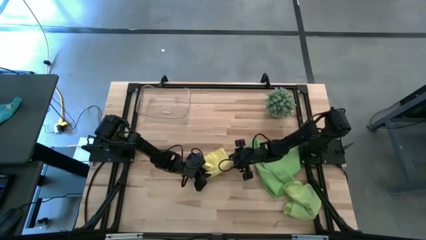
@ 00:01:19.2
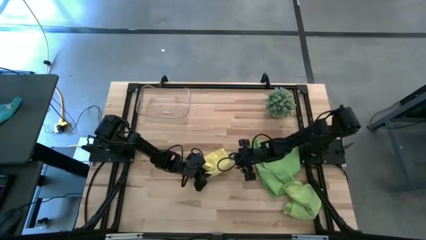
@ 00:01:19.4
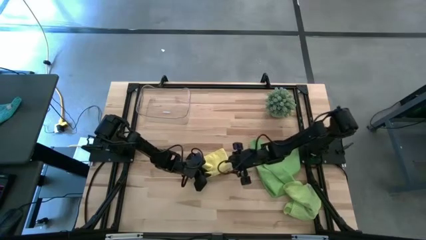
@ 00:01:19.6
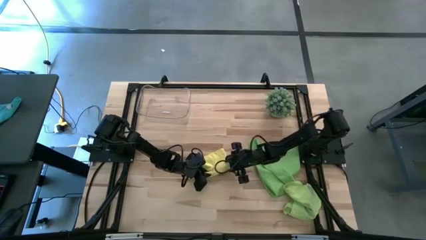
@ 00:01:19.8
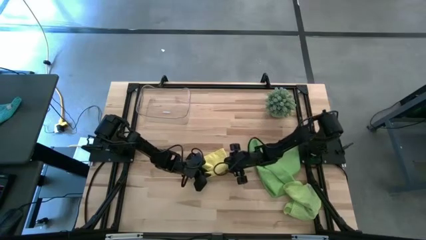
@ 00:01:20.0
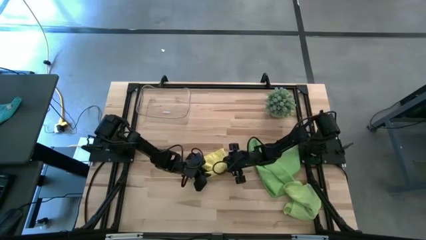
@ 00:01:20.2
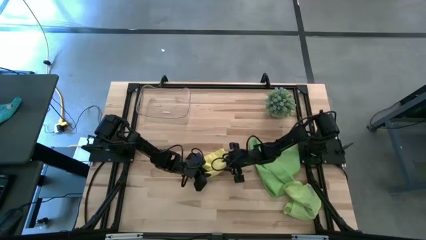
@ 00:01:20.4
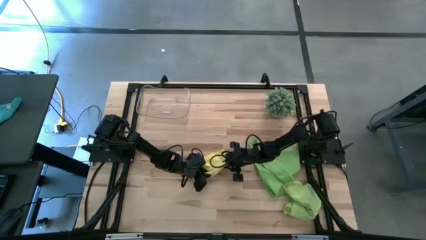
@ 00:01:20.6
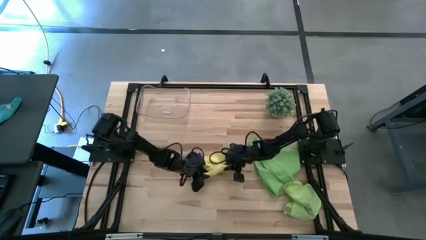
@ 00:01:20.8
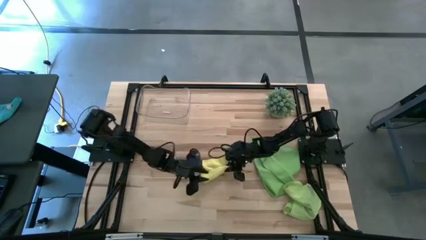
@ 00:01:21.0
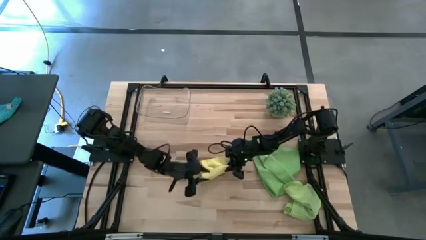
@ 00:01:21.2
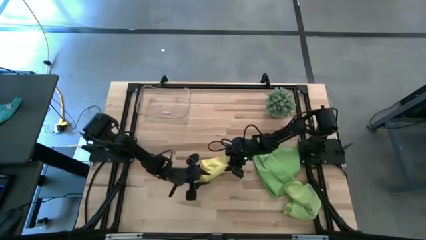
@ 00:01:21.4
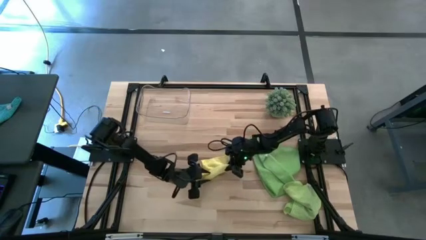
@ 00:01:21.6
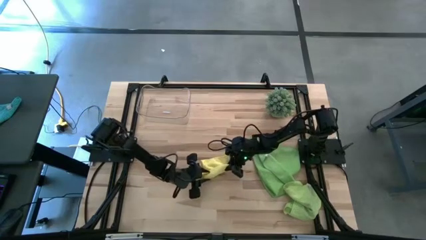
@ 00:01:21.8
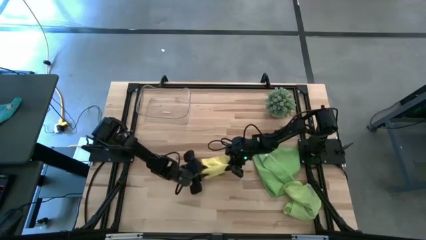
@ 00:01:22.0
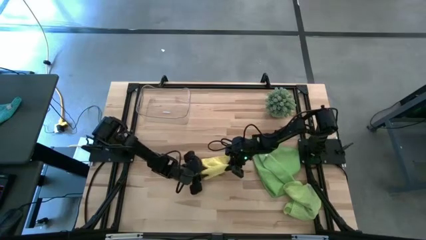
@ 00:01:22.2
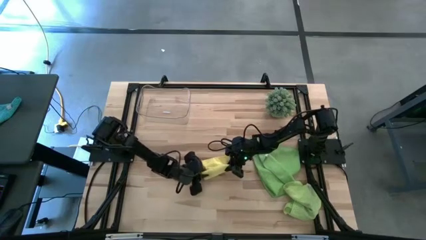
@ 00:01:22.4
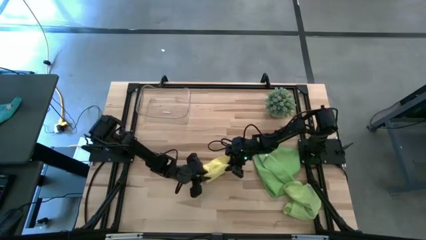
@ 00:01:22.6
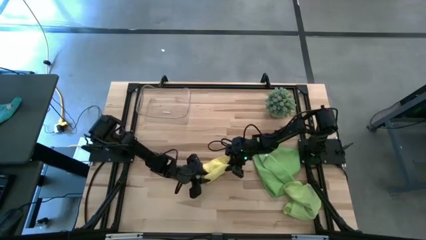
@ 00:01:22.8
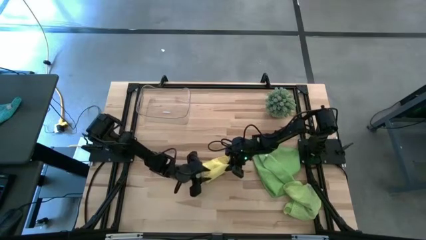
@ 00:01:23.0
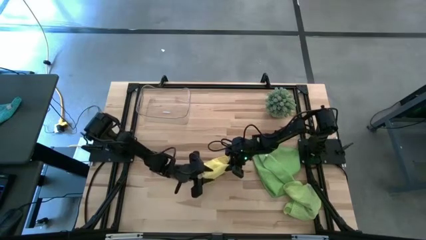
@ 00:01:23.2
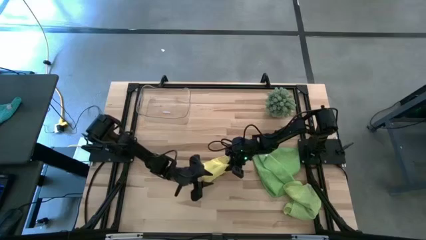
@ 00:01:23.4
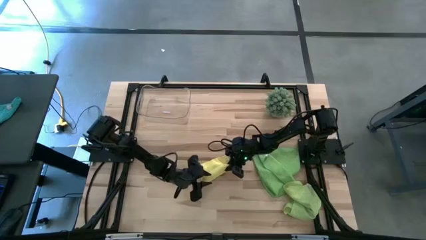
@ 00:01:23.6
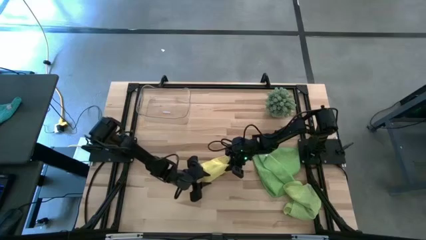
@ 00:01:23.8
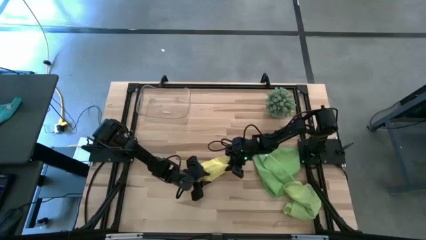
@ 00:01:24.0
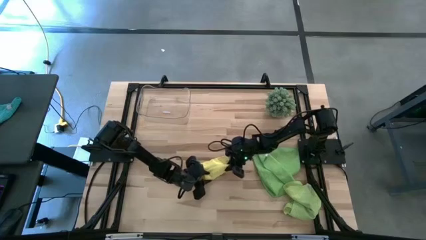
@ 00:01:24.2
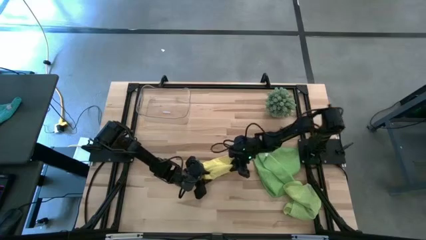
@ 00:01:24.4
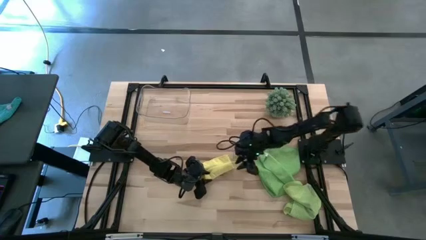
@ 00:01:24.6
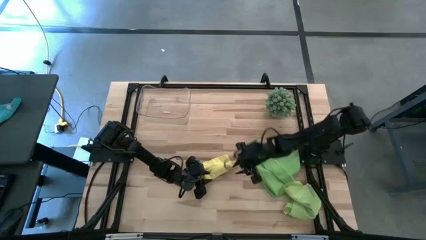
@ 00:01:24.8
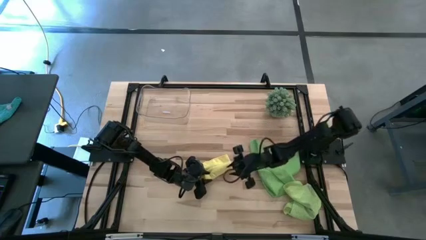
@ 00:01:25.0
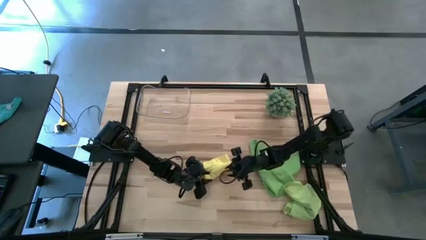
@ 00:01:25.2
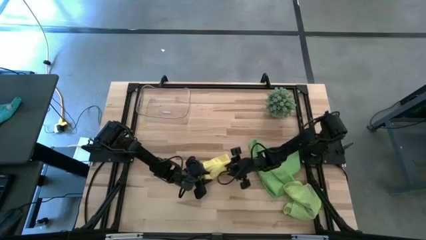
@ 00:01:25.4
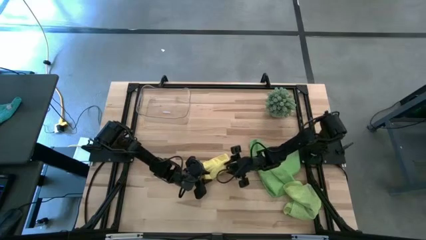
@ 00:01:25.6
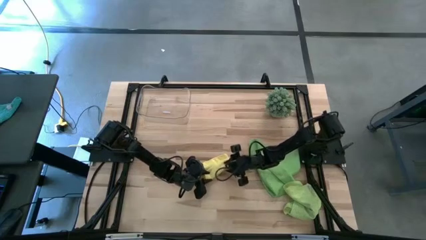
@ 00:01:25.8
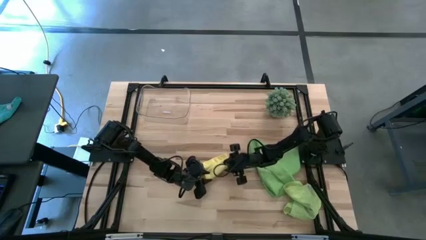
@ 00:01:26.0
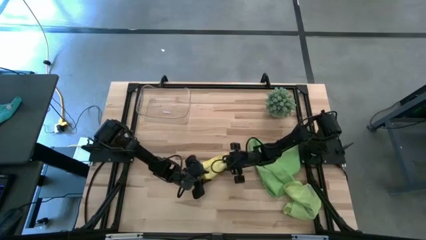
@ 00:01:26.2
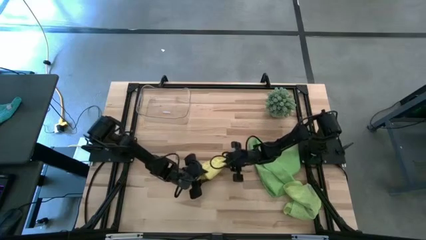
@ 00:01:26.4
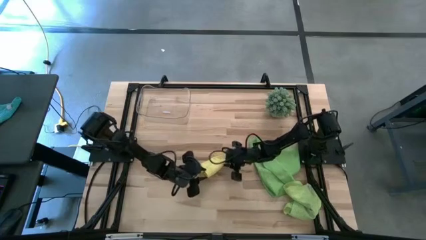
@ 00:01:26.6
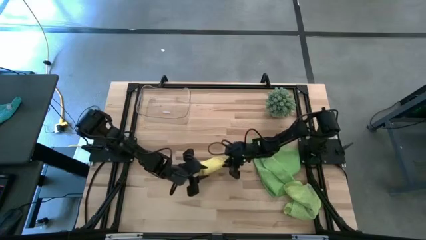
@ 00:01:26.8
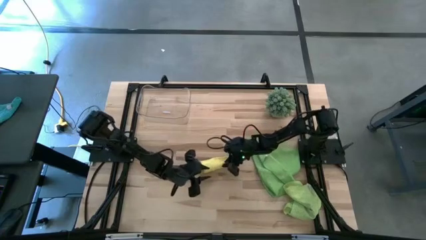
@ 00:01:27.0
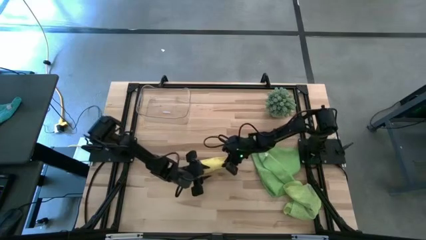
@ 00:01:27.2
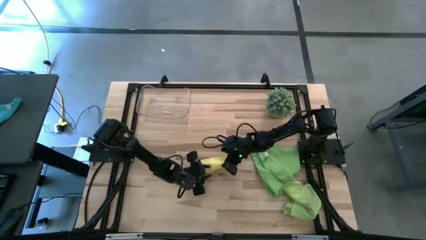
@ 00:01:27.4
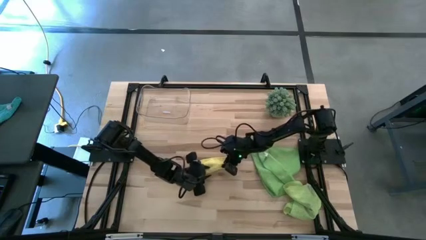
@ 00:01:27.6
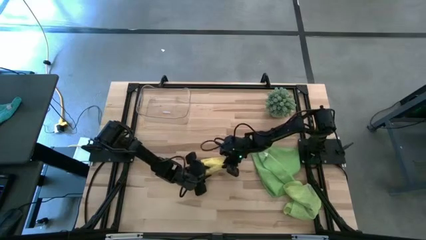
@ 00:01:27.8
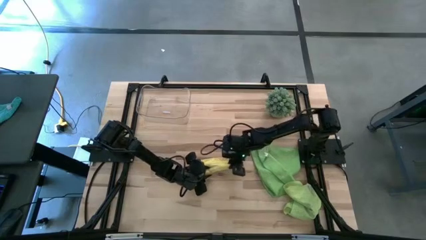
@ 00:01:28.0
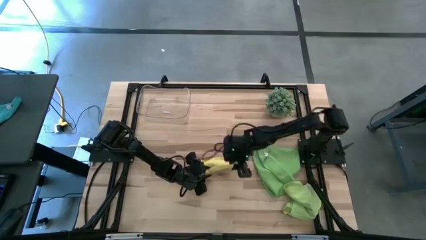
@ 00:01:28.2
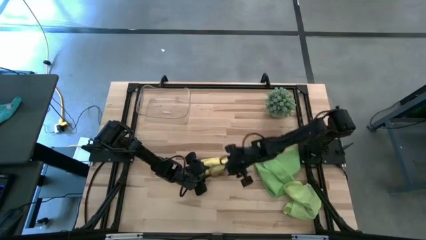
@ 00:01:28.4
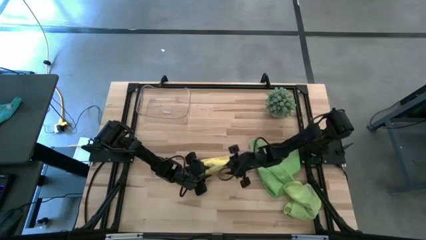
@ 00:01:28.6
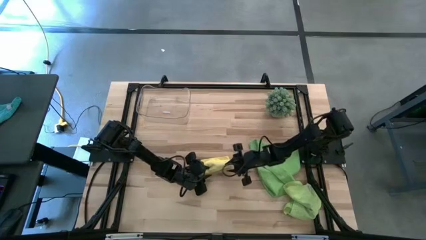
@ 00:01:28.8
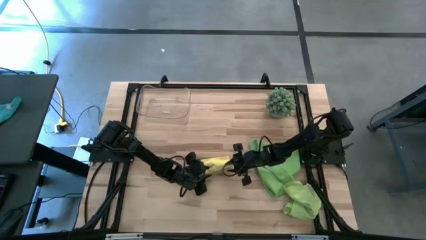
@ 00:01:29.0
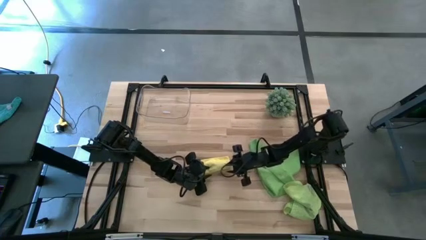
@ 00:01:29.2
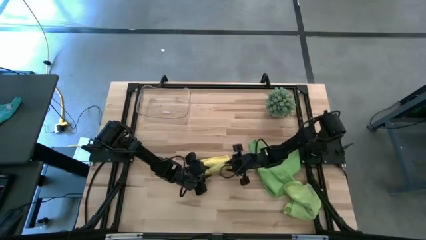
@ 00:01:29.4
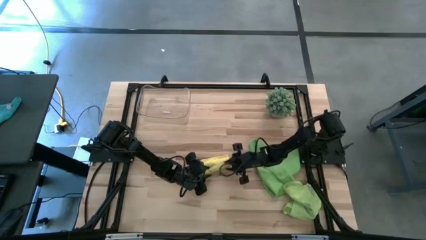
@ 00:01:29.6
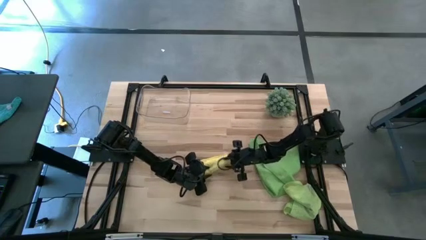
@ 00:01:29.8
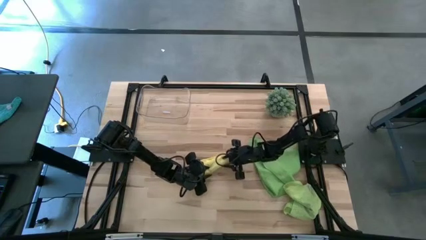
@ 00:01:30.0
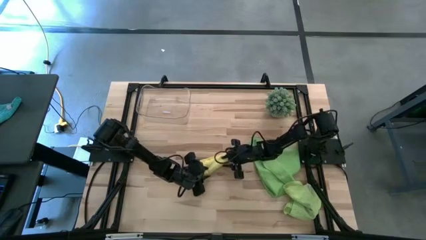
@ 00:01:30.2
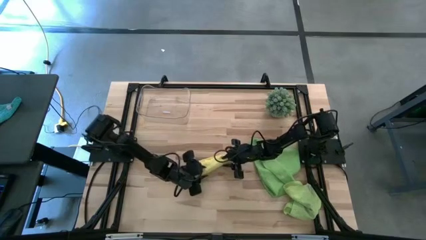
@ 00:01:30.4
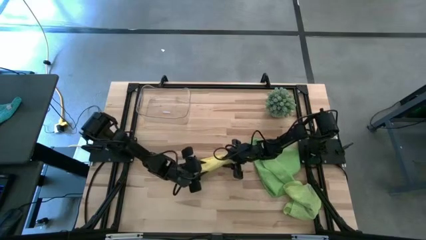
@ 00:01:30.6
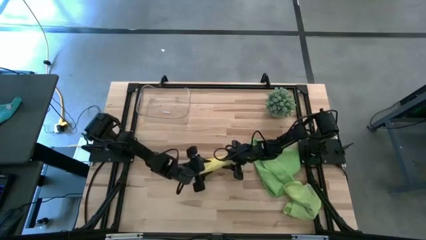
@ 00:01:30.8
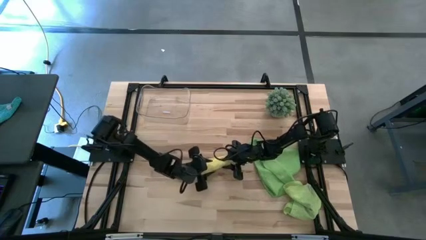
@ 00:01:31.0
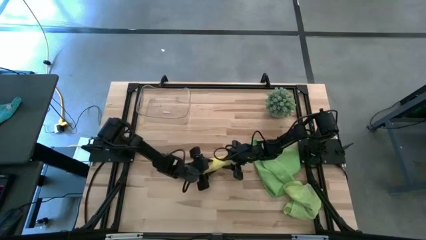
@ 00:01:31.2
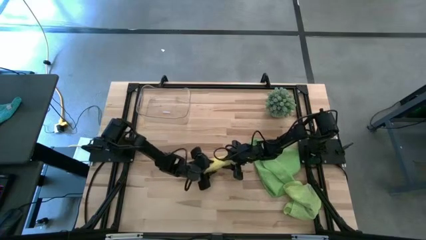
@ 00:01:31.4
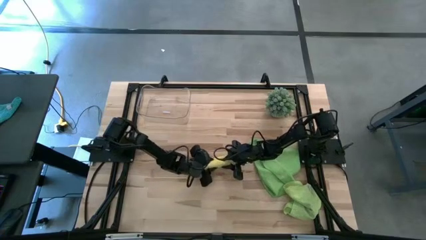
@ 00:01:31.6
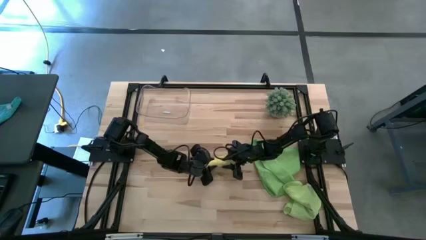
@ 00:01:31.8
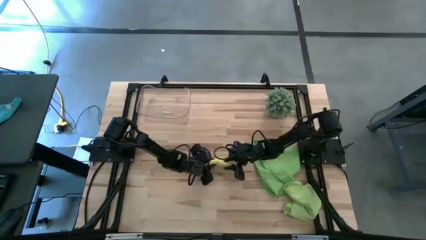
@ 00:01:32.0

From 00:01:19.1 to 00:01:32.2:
Task: Roll microfiber towels into tight, uniform cylinder then place into a basket
Roll the yellow microfiber cloth

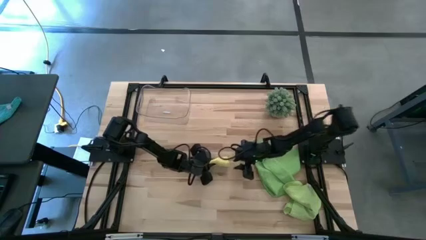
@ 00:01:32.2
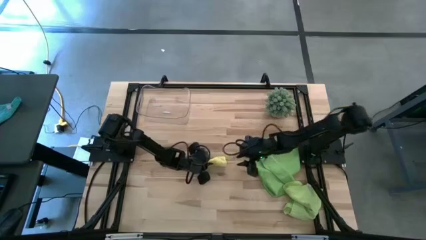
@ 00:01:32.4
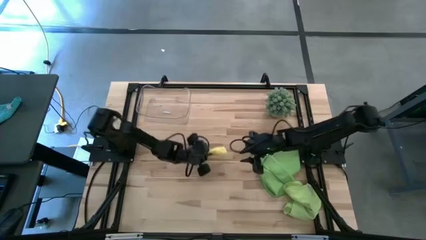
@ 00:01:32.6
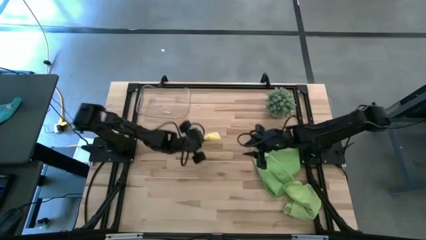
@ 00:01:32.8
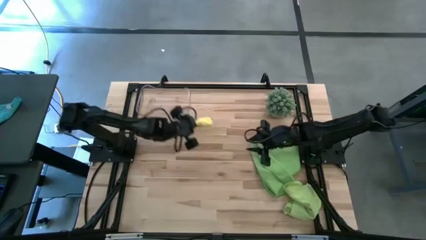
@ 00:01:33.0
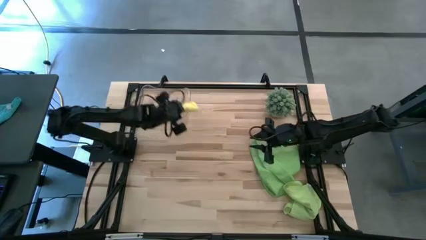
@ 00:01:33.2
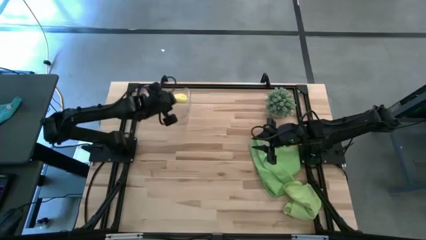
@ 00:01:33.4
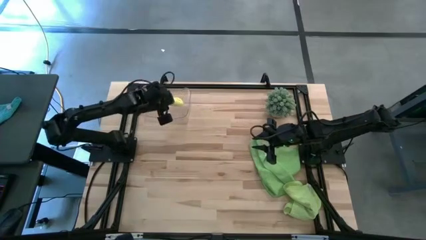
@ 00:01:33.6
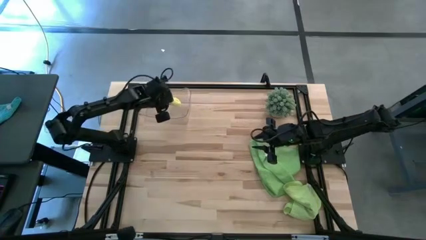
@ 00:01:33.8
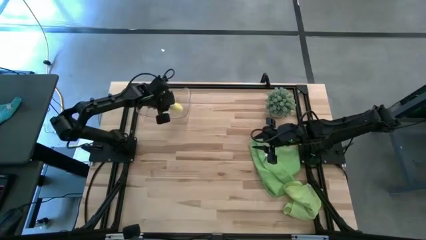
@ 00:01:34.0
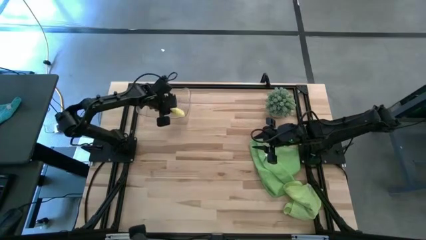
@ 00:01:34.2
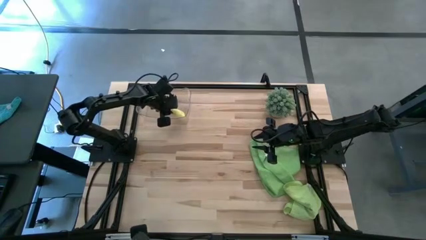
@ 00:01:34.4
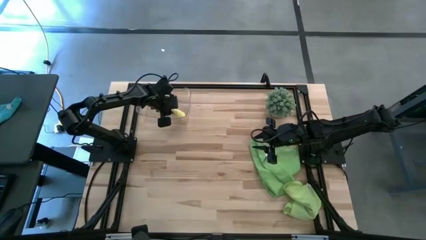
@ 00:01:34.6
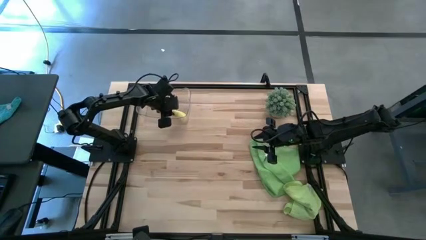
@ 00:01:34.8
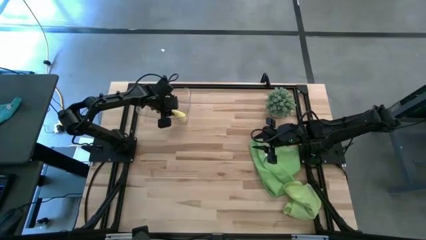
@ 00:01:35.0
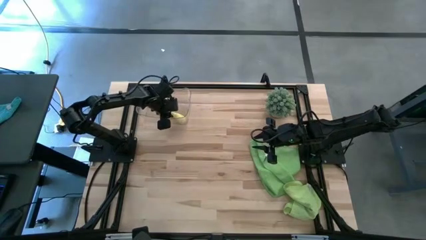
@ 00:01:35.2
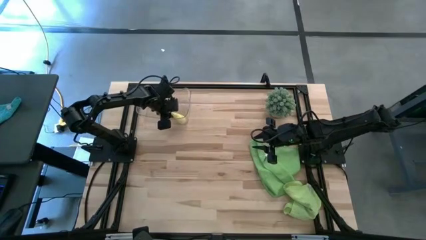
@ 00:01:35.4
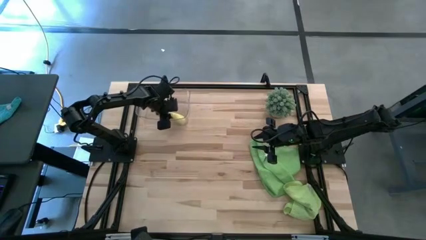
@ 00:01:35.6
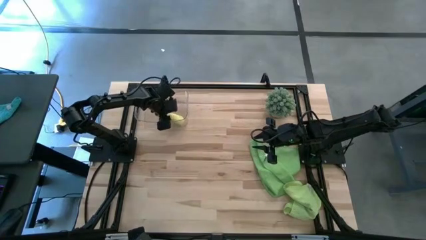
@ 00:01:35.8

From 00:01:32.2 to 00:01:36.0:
Put the yellow microfiber cloth into the transparent bin
